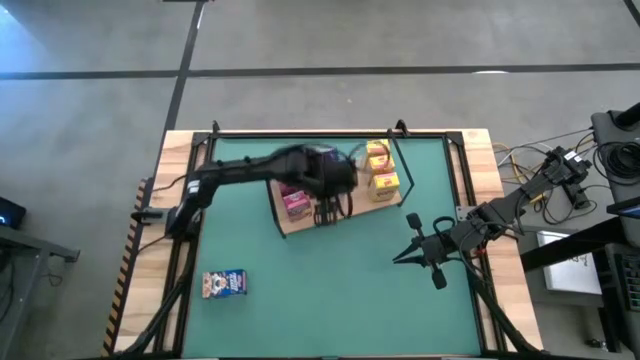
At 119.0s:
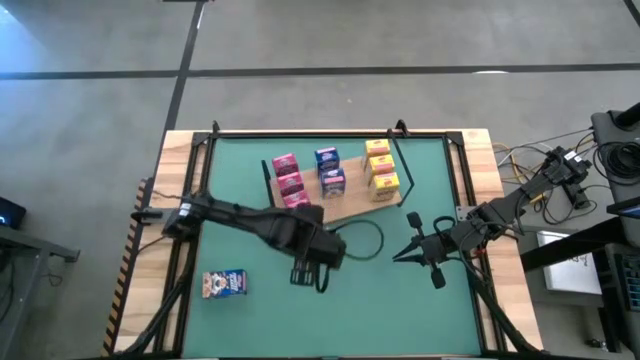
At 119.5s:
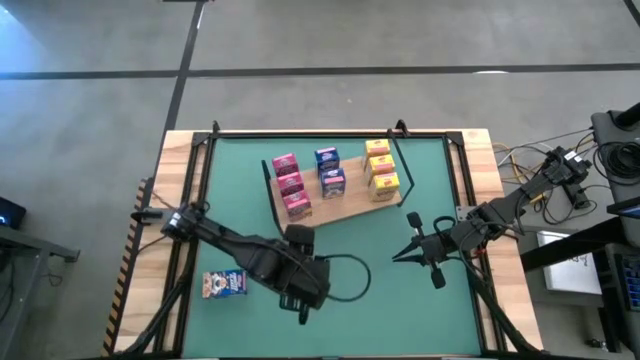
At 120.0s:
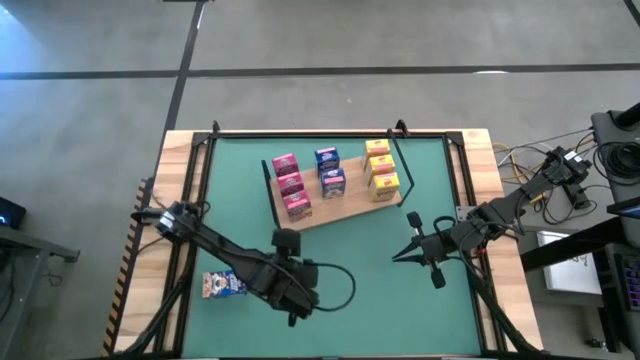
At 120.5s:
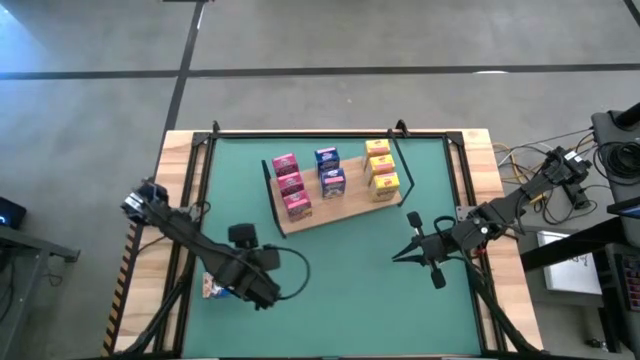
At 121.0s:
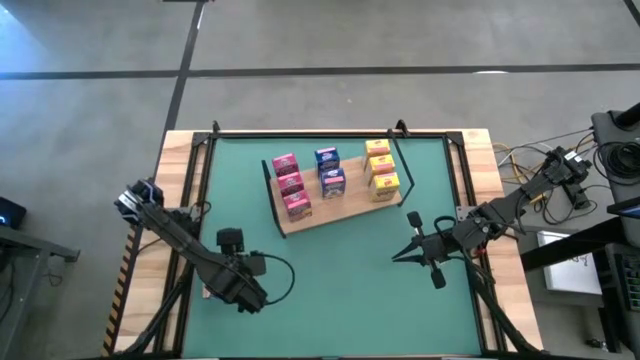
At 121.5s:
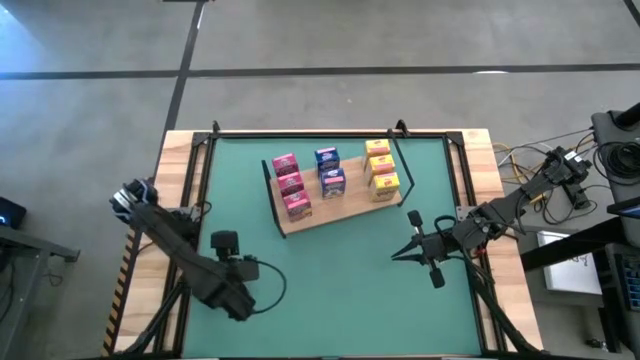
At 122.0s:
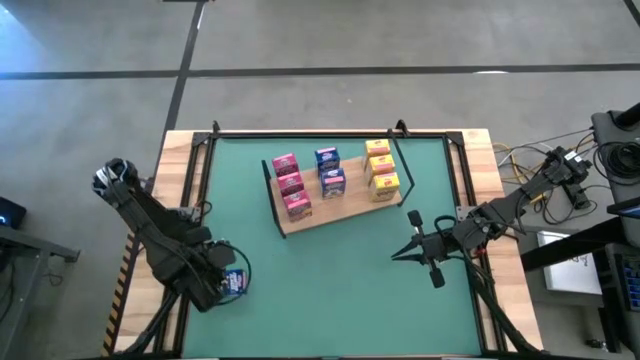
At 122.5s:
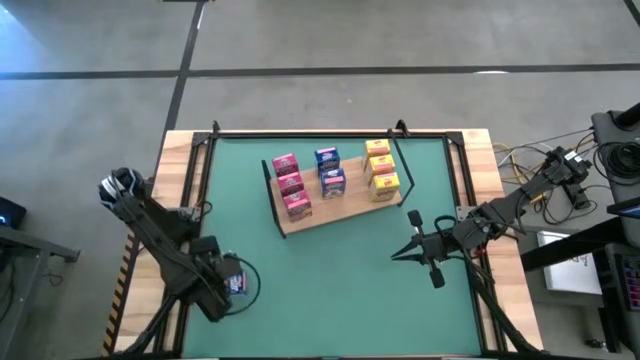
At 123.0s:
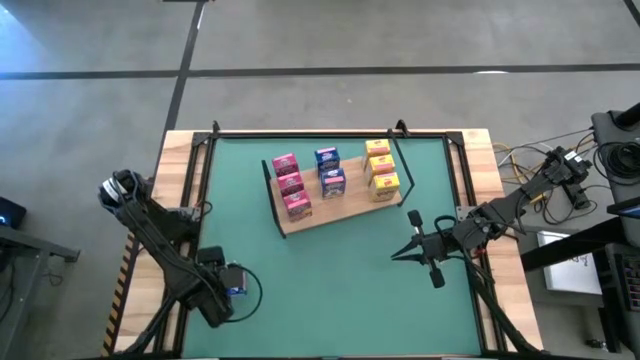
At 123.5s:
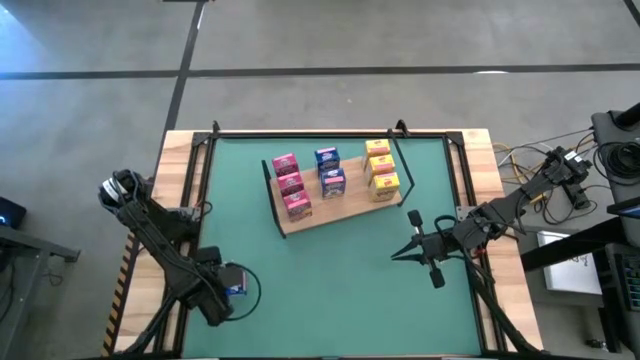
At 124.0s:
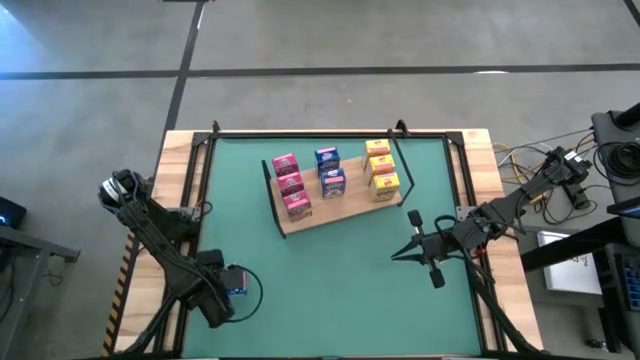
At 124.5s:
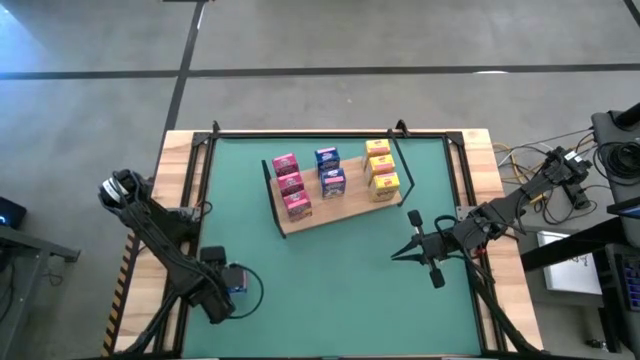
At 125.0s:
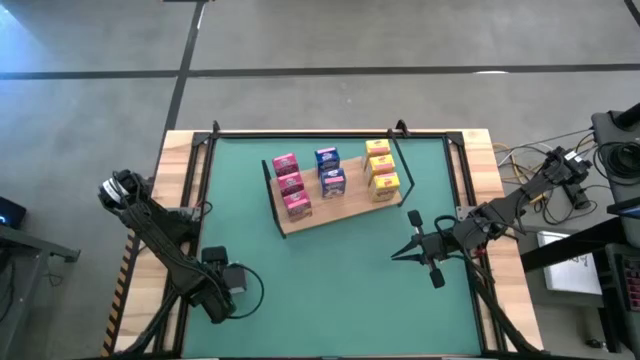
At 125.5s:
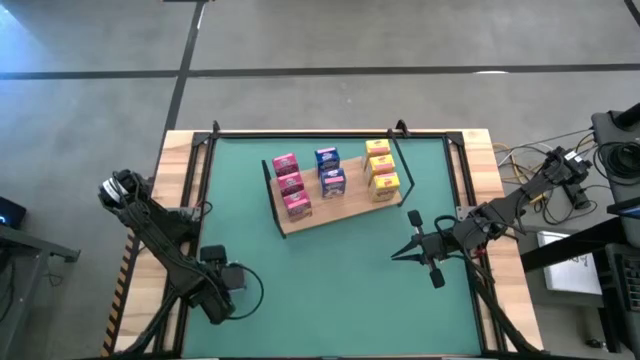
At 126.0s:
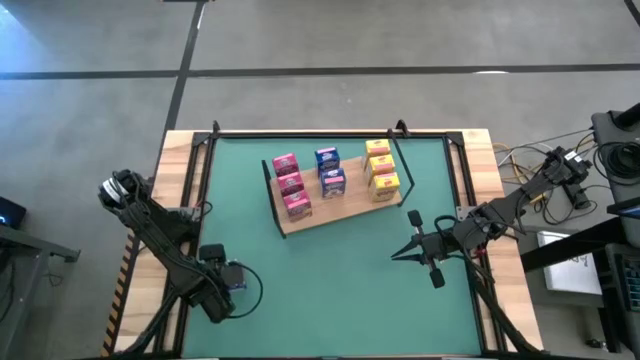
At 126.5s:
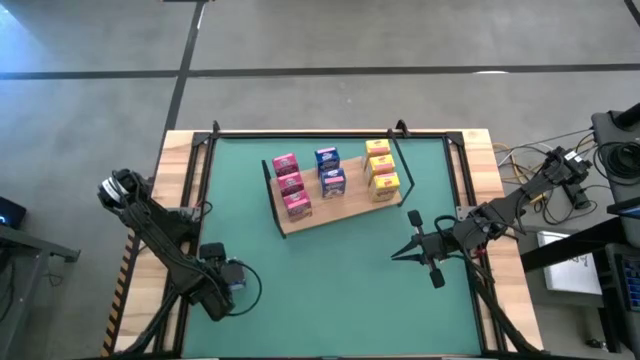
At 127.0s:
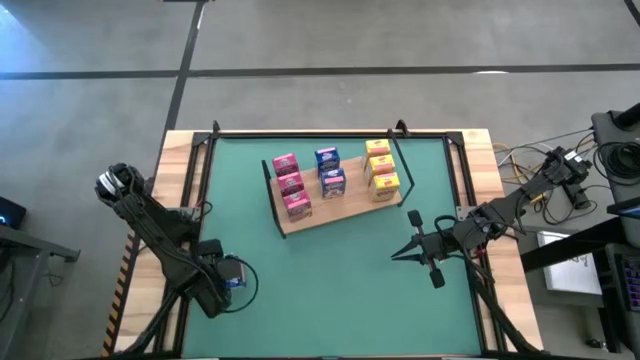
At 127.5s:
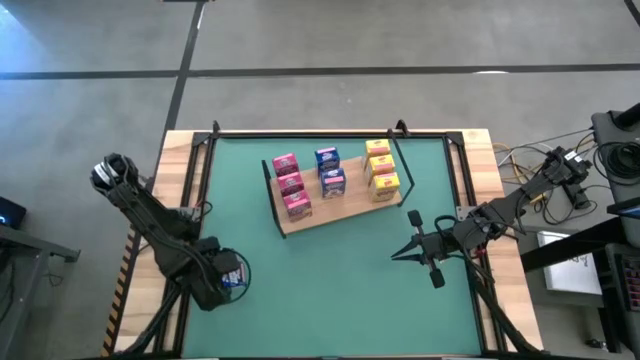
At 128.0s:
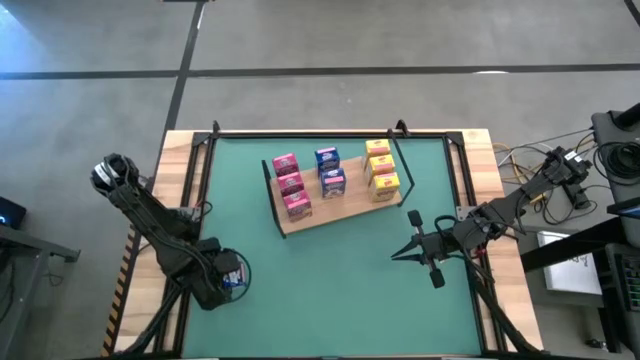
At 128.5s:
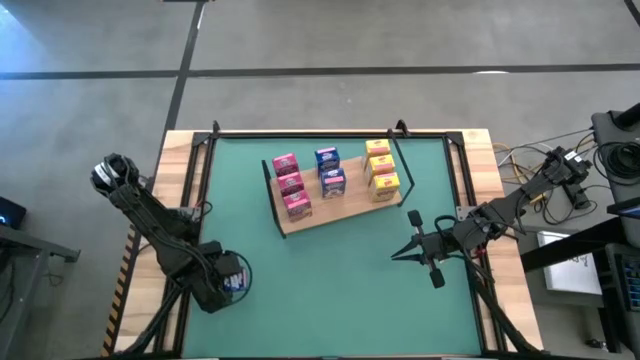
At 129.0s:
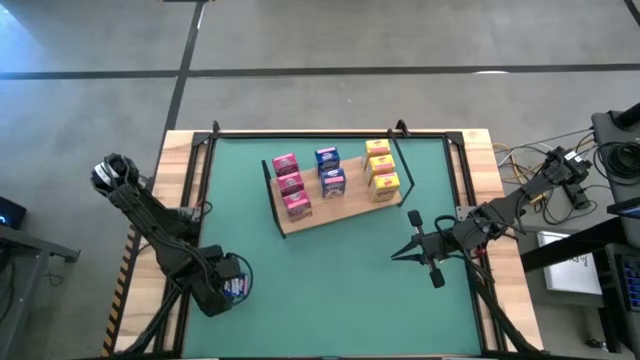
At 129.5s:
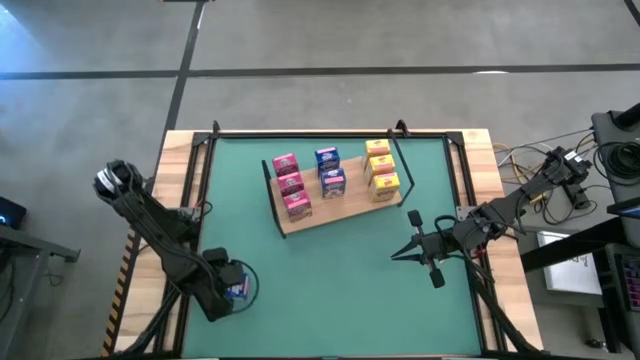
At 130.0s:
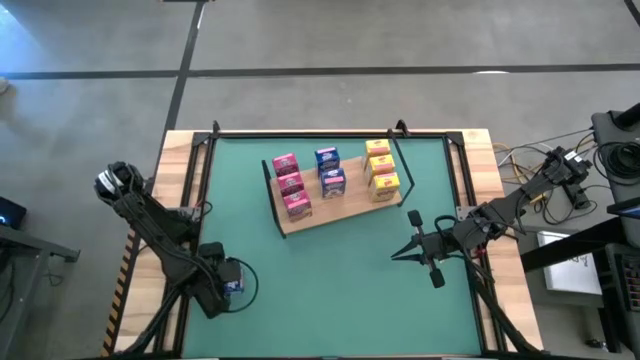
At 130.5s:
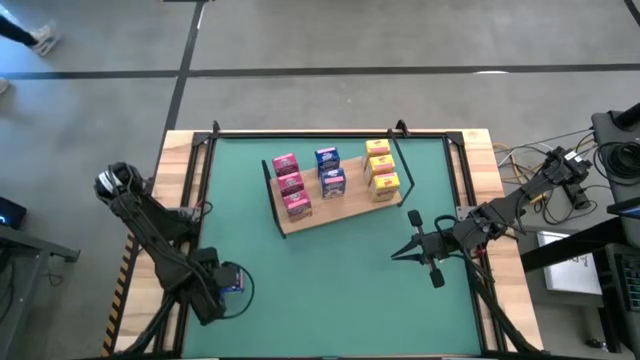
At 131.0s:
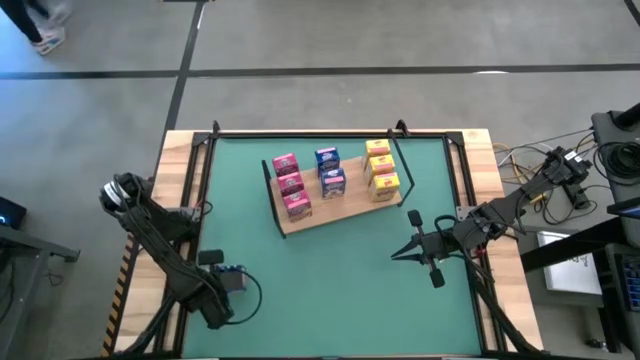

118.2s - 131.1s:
Task: Stack cereal on shelf
Put the blue cereal box on the shelf aligned with the other blue cereal boxes

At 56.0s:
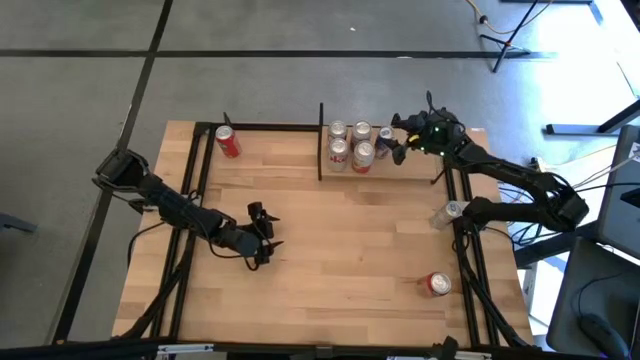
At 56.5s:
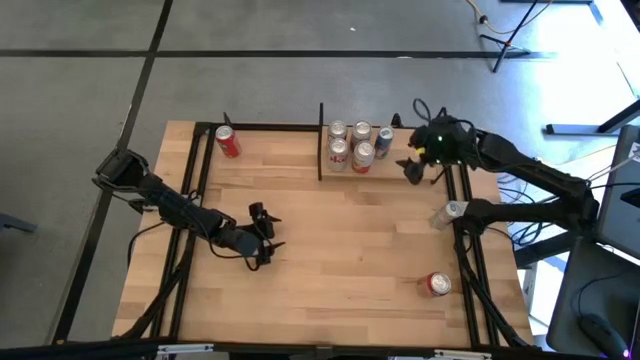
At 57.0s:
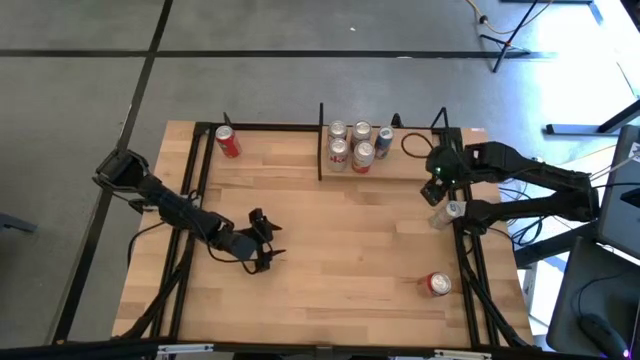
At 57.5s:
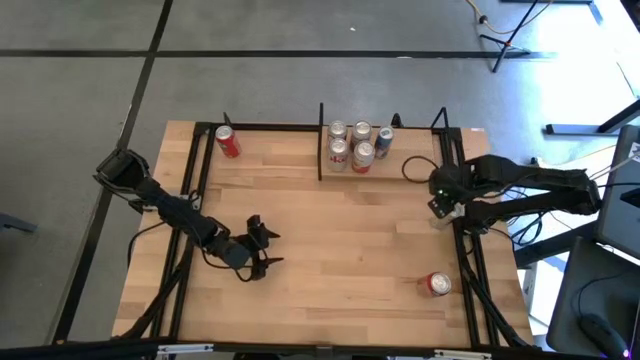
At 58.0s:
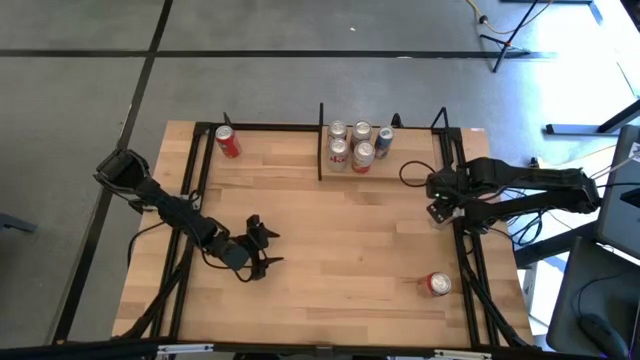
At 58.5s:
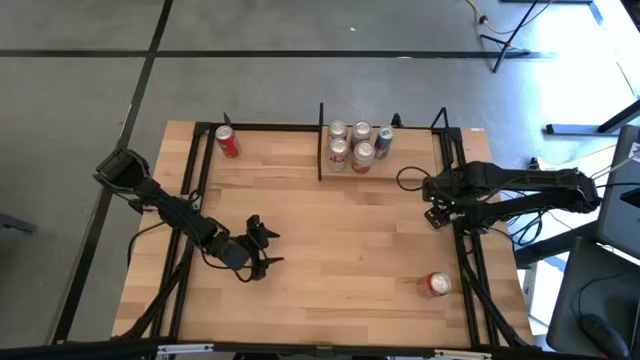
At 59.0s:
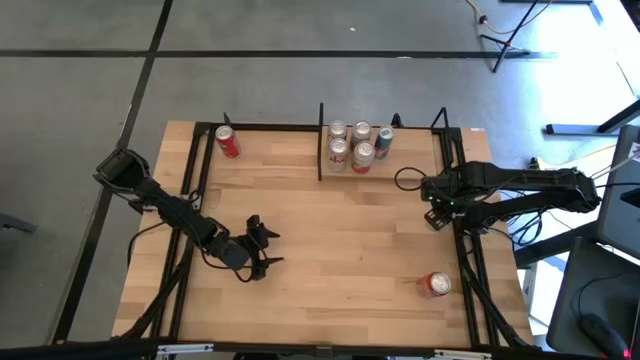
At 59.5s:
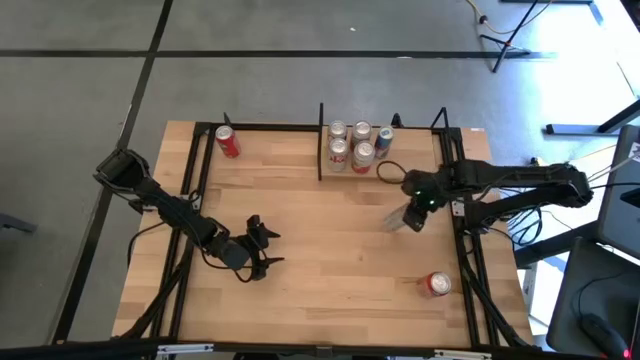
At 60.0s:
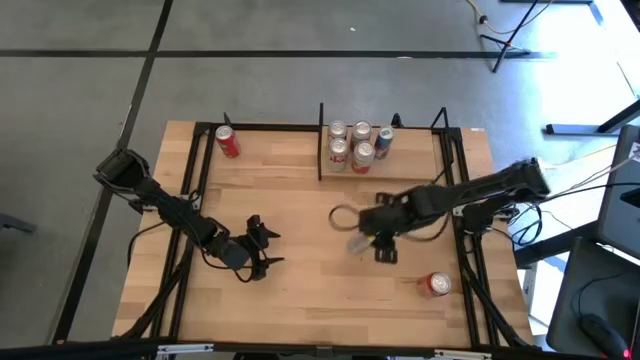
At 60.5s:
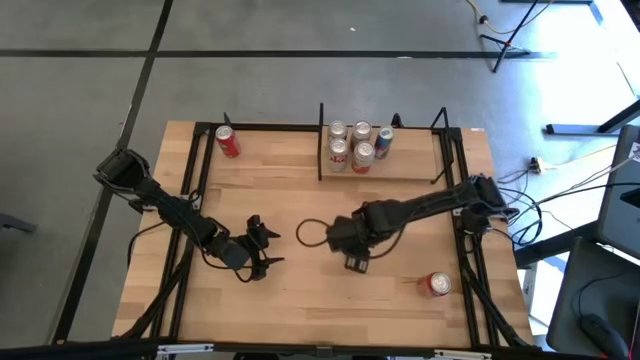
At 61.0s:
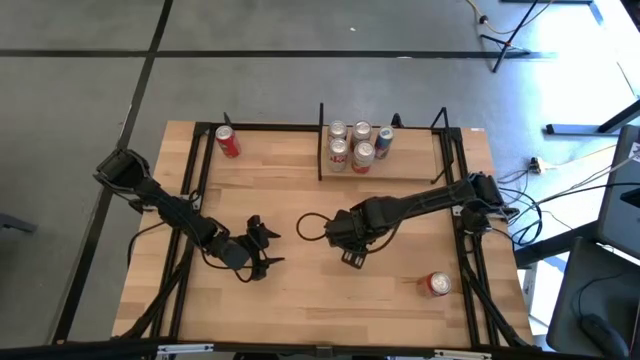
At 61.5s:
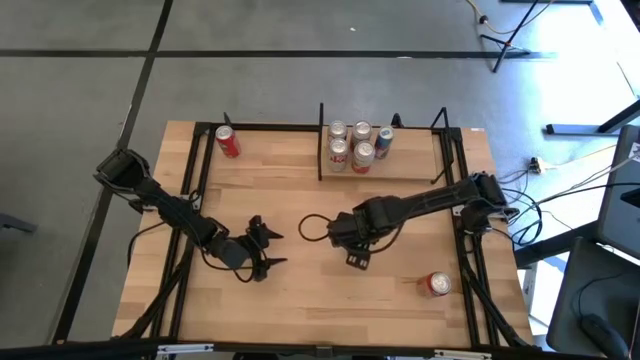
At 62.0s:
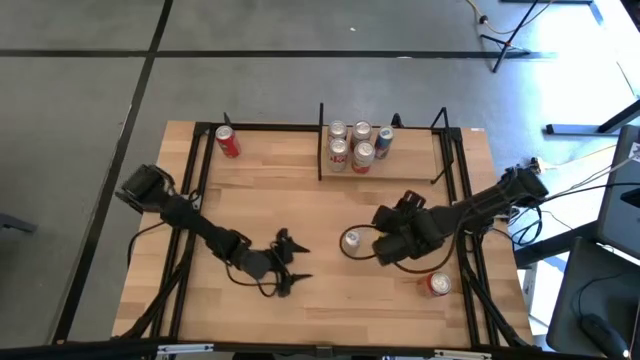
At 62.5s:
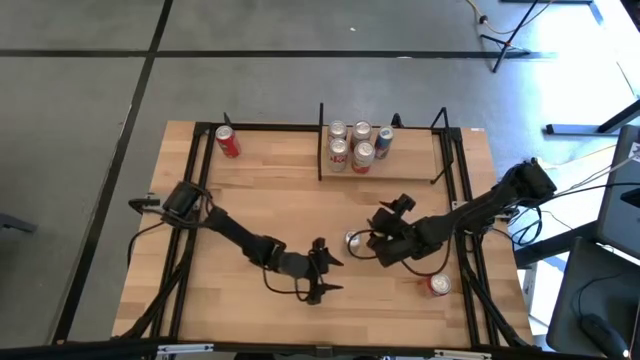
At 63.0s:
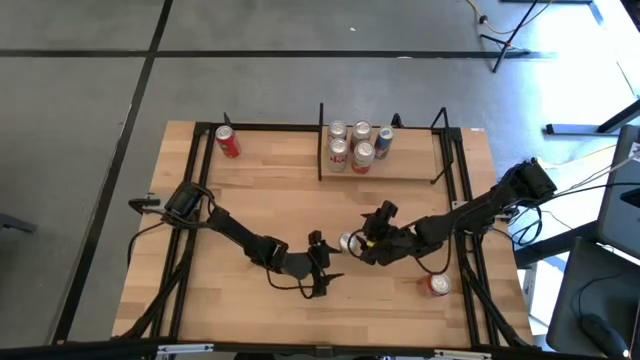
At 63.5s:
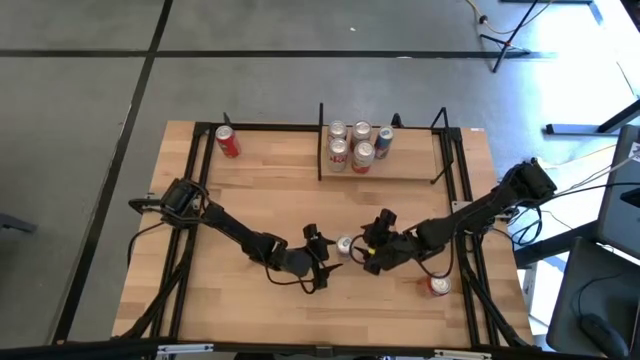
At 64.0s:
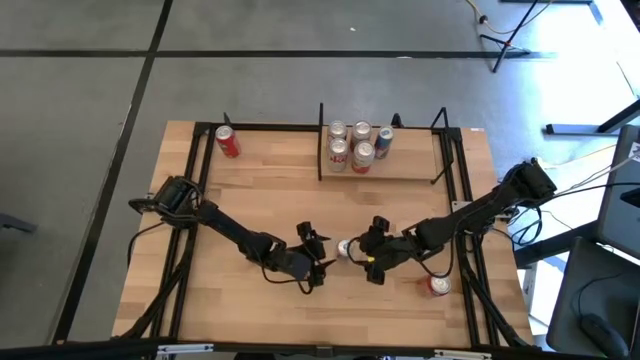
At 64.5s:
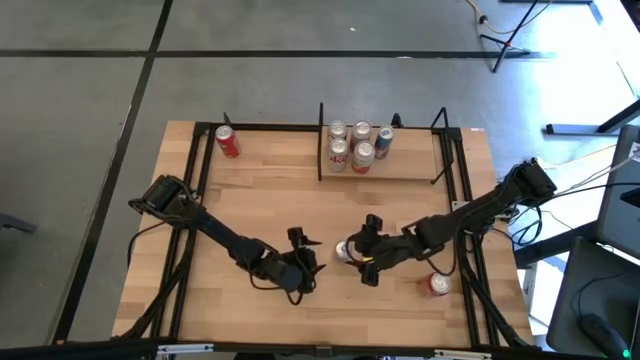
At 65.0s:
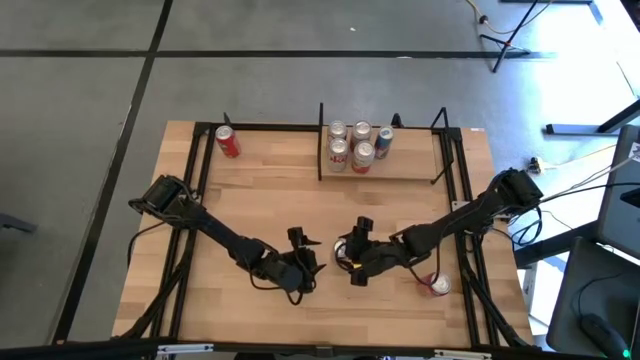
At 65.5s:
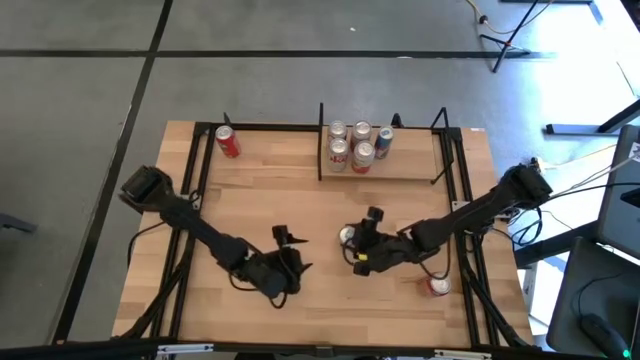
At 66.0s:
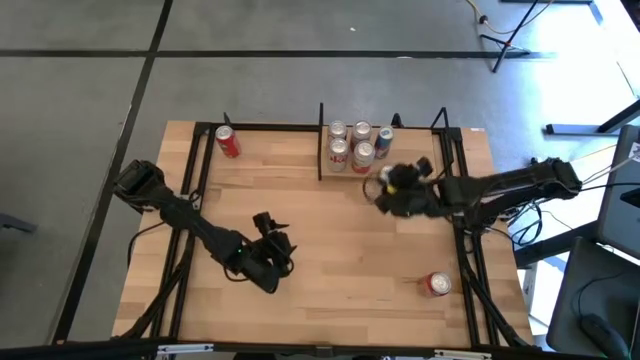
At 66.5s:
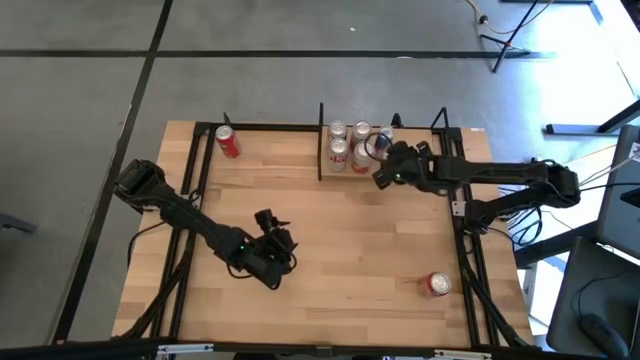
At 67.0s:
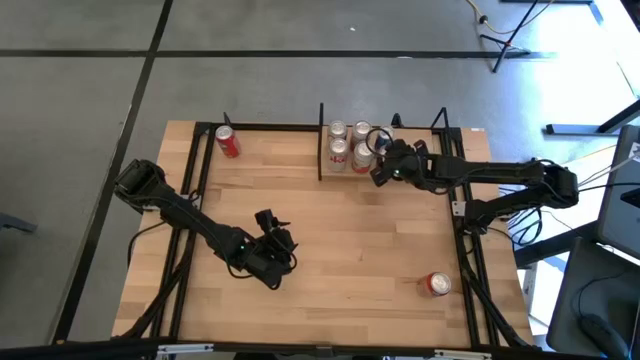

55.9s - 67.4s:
Task: Place canned beverage on shelf
Put the blue soda can on the shelf aligned with the other blue soda can
